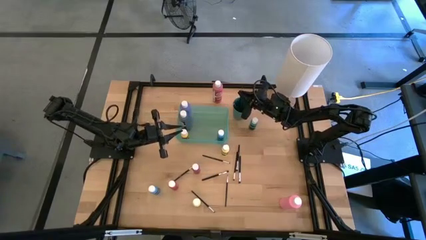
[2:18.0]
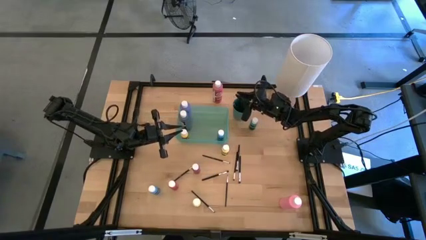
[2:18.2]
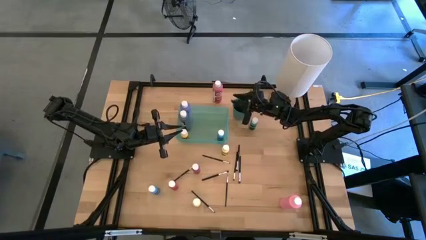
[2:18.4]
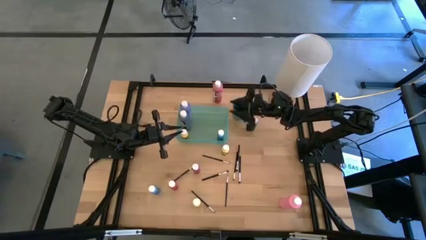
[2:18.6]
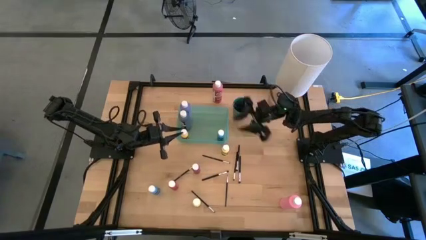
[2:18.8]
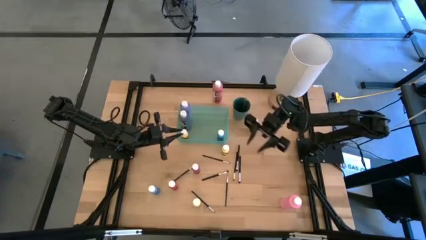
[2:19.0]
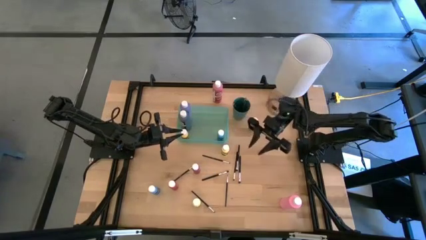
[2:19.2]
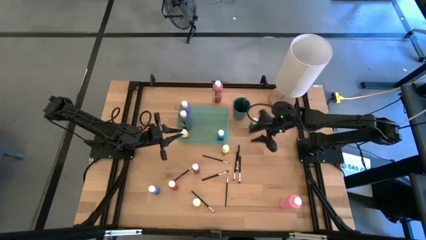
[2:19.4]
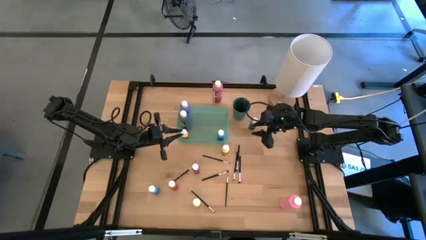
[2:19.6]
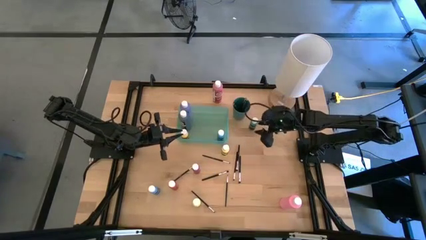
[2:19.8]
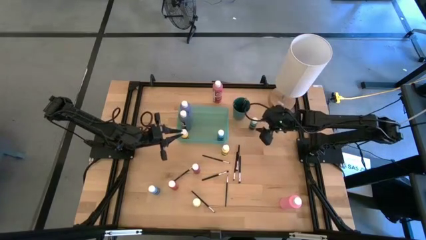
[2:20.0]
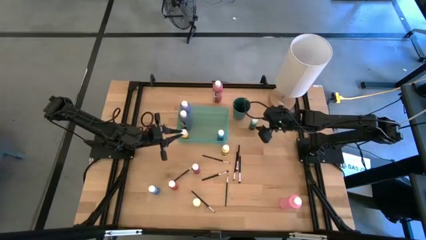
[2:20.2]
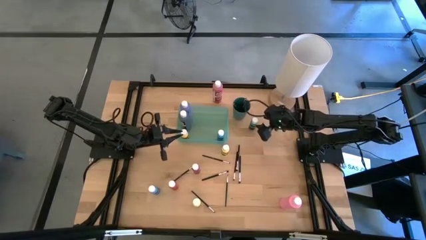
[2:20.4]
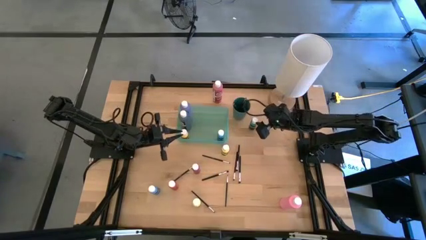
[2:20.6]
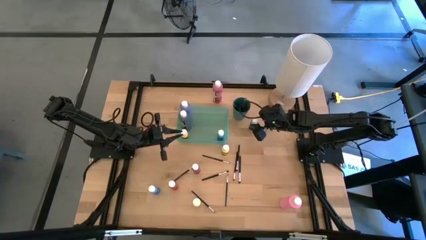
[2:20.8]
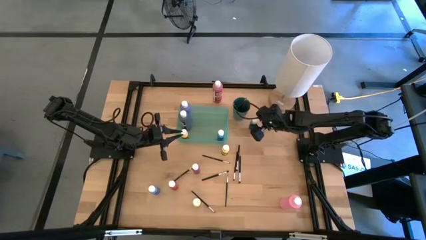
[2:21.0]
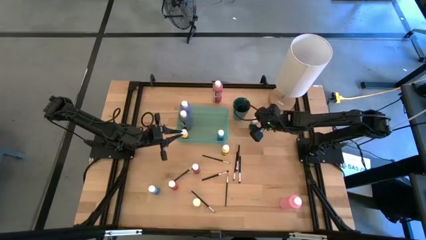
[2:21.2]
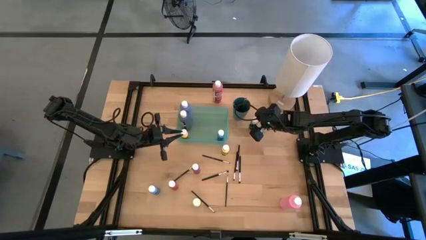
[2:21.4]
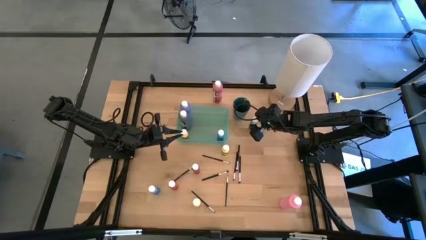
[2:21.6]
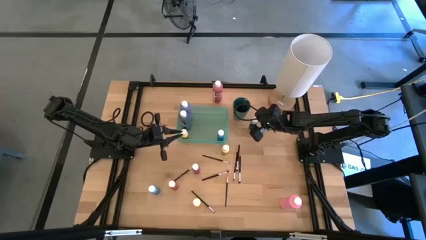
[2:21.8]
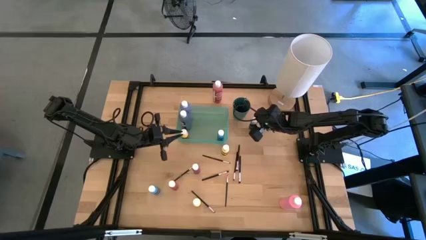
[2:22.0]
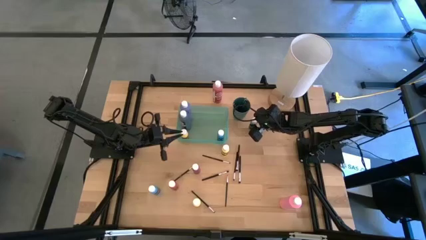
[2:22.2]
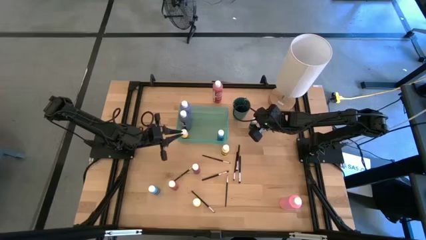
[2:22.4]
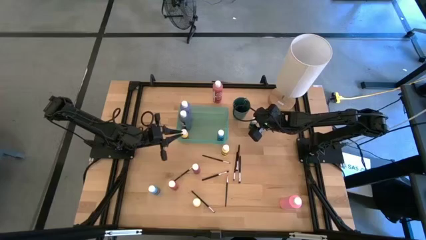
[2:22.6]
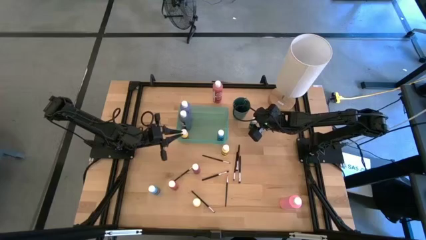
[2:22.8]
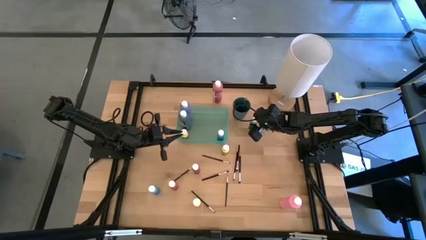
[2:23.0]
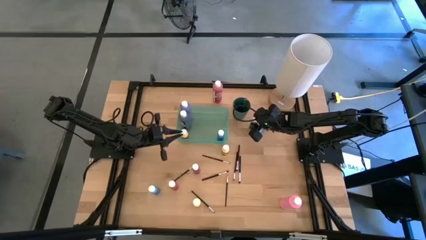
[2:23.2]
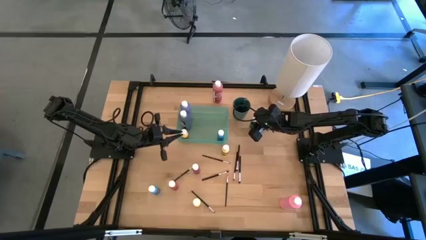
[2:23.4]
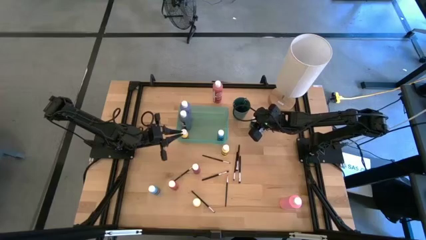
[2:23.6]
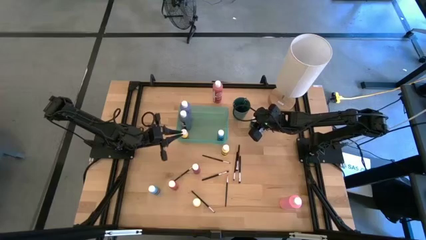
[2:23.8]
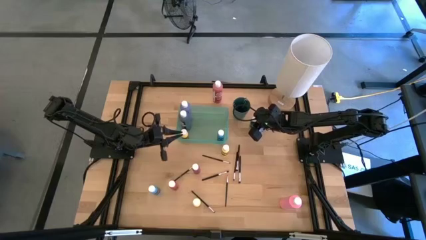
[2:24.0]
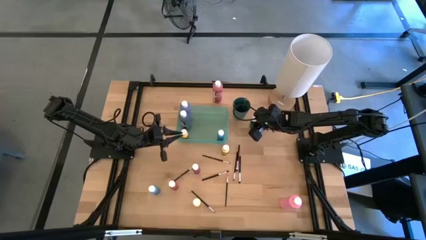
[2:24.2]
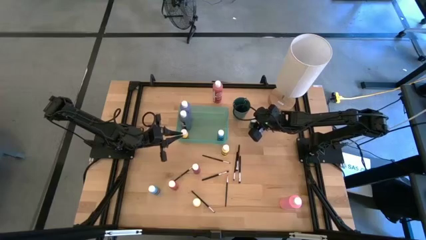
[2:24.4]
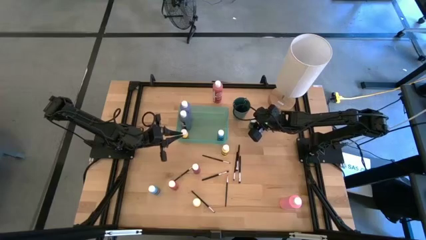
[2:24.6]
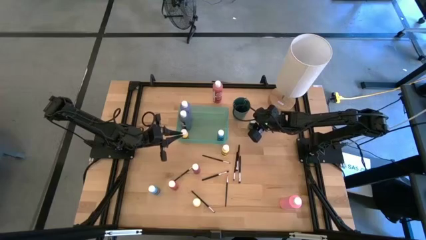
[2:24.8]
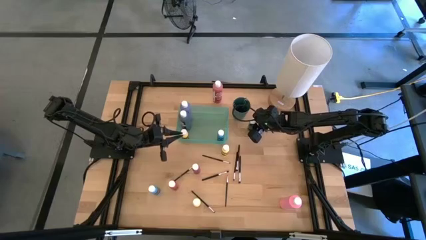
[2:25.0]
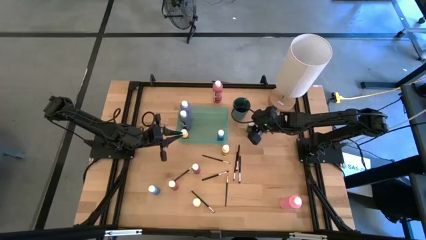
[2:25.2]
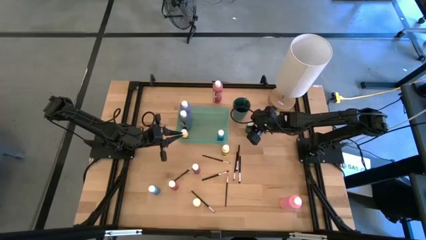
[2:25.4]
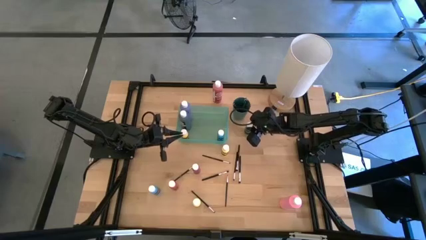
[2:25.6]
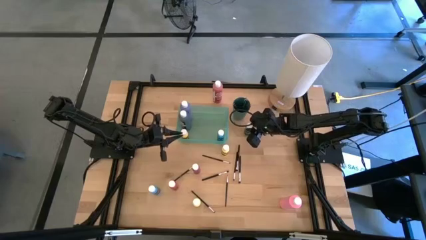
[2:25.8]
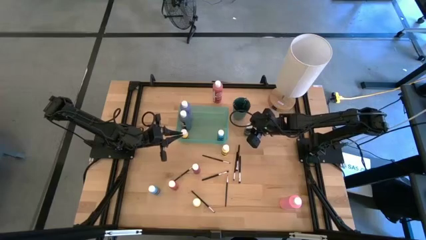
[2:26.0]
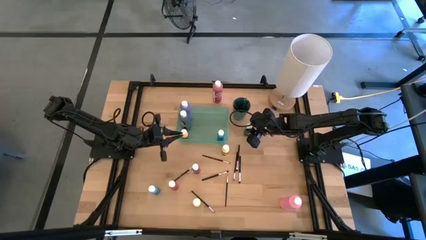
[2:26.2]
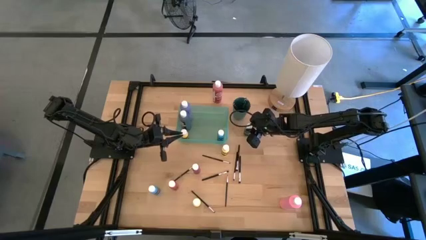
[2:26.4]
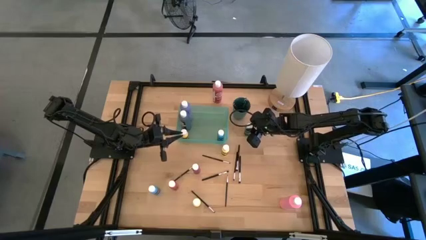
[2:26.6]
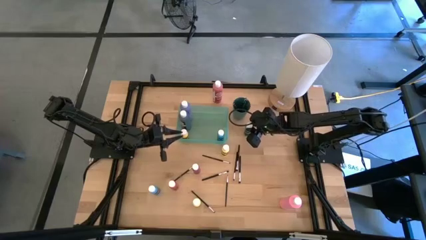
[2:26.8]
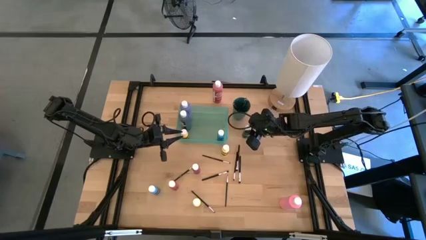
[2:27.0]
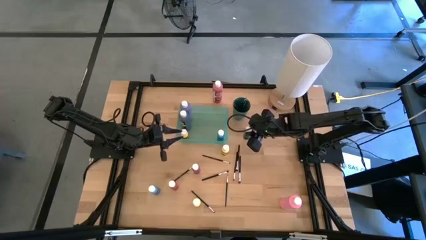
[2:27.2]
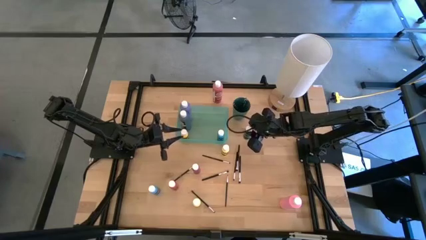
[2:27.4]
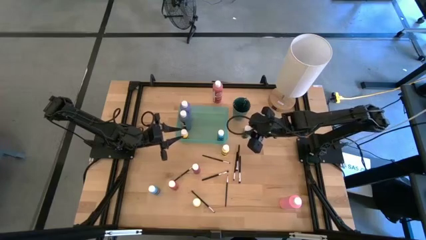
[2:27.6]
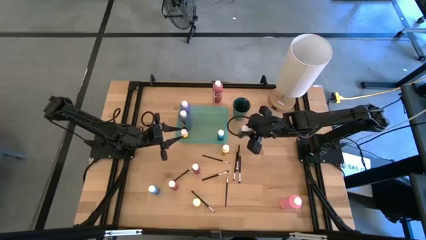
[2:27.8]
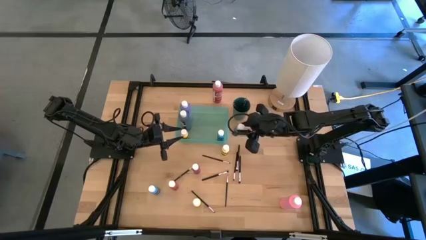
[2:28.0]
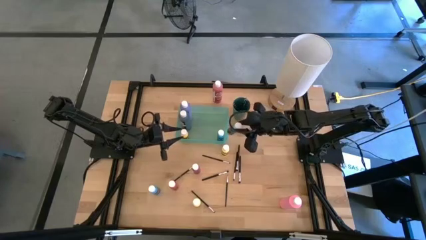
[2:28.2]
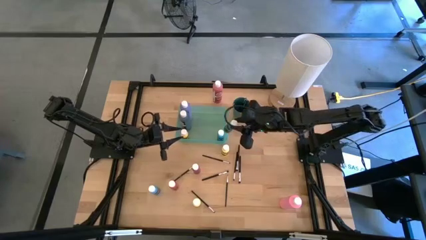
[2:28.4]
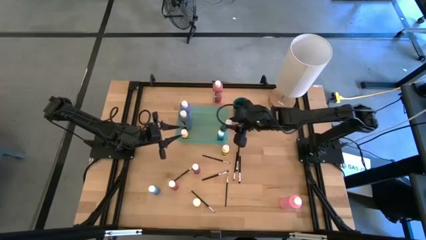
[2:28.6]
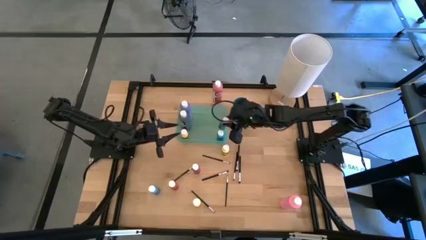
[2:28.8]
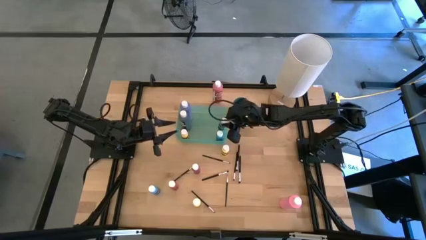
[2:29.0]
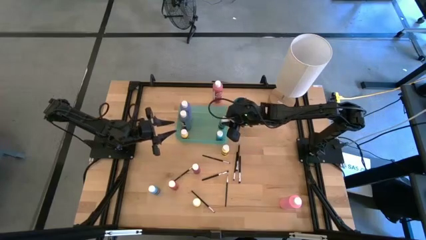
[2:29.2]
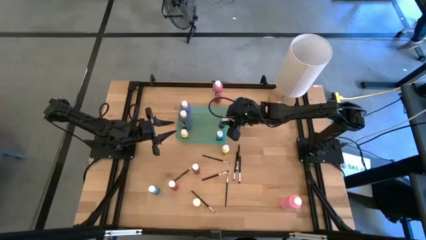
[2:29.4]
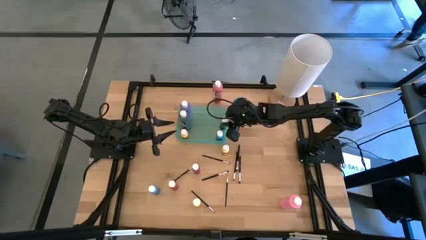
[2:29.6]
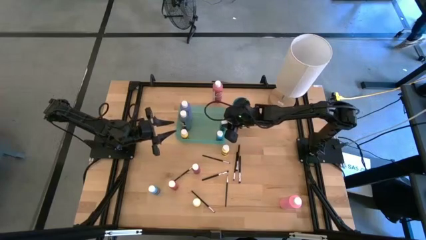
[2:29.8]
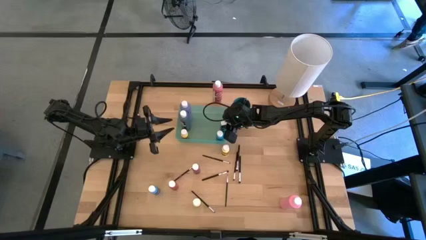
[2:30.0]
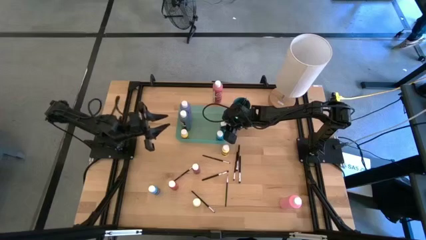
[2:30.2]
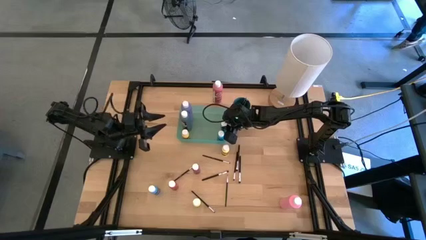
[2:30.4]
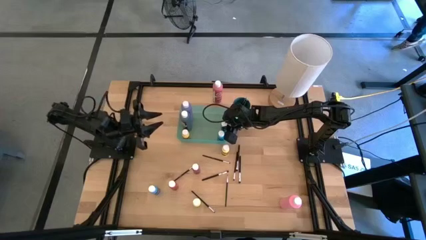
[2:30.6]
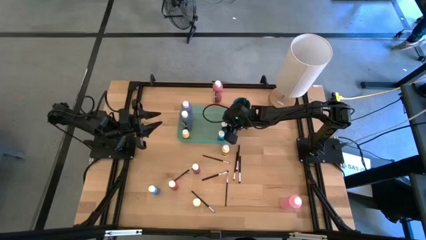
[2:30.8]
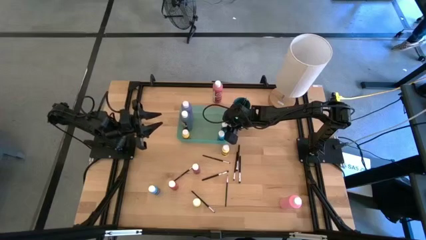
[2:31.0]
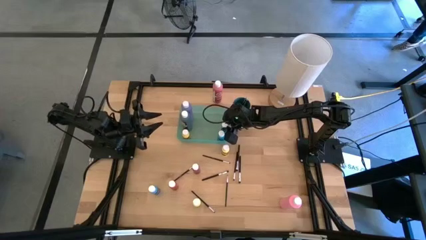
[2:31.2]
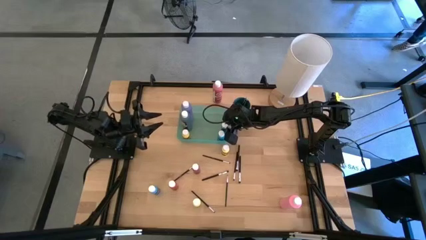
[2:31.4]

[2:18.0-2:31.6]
Task: Pick & Place Paint Supplies
Put the small green paint bottle into the green bin
